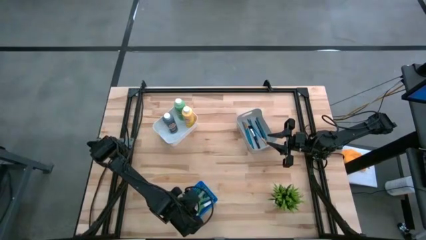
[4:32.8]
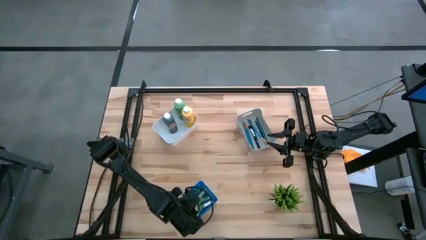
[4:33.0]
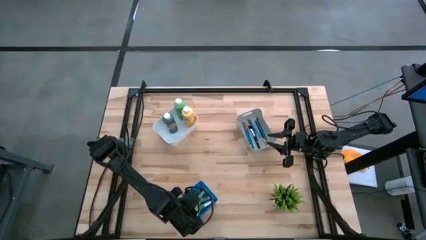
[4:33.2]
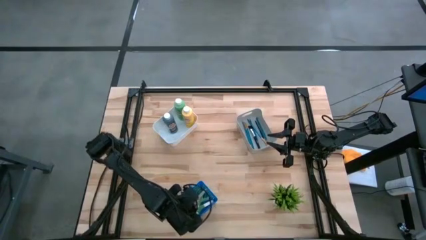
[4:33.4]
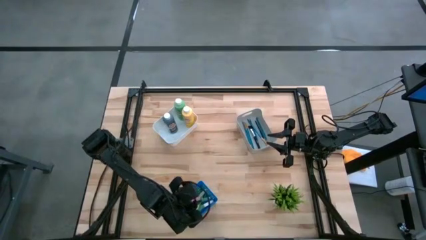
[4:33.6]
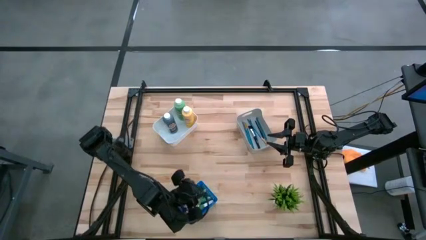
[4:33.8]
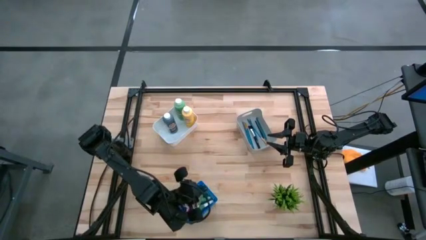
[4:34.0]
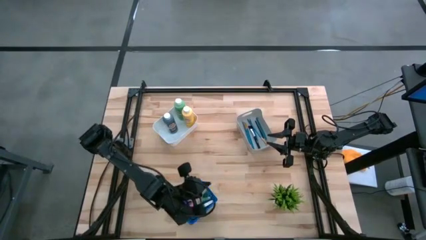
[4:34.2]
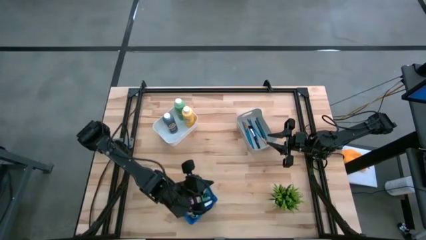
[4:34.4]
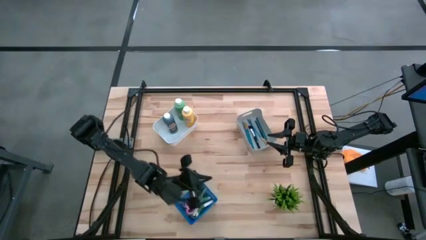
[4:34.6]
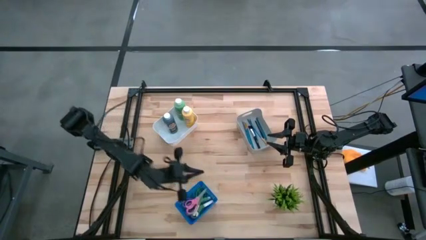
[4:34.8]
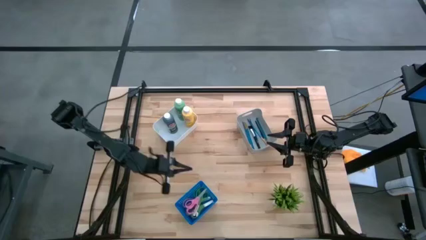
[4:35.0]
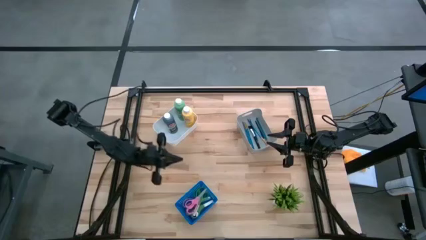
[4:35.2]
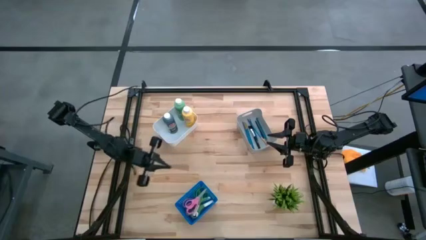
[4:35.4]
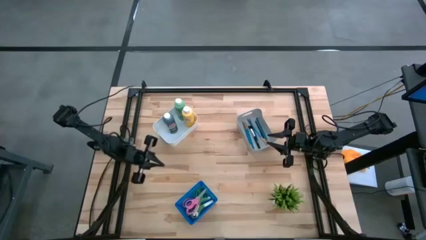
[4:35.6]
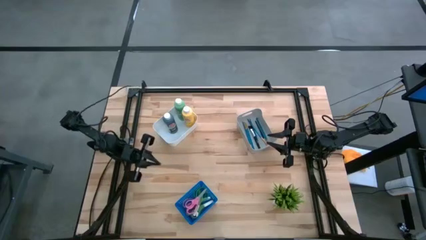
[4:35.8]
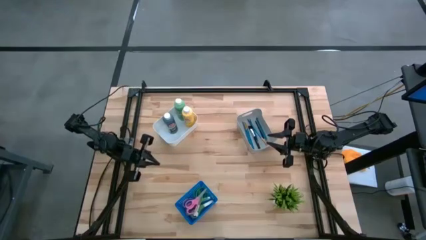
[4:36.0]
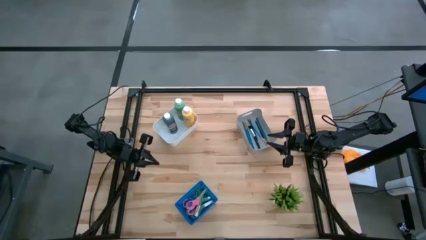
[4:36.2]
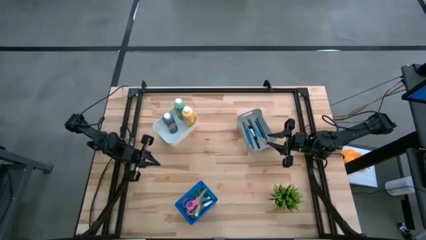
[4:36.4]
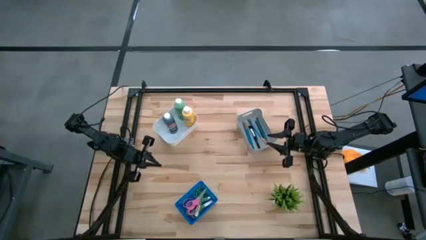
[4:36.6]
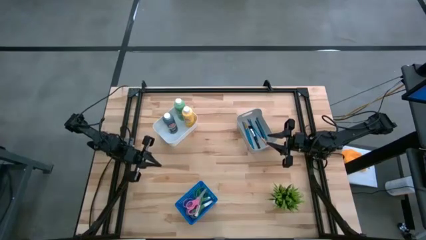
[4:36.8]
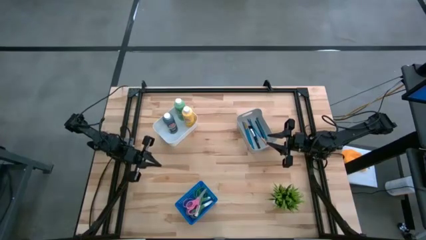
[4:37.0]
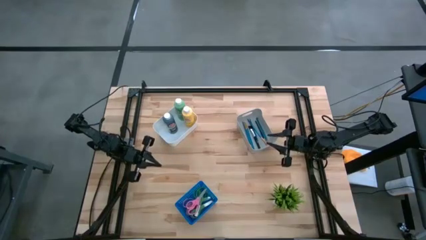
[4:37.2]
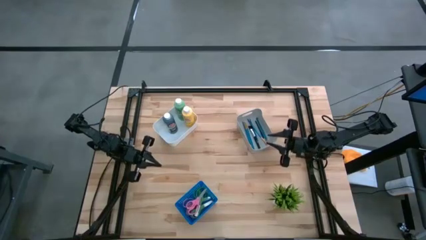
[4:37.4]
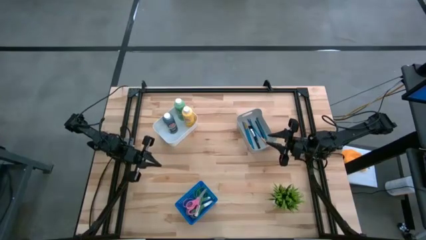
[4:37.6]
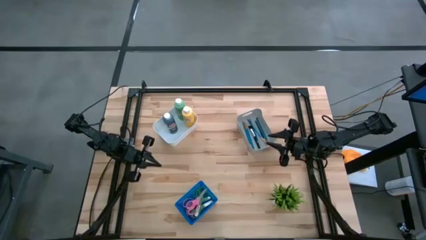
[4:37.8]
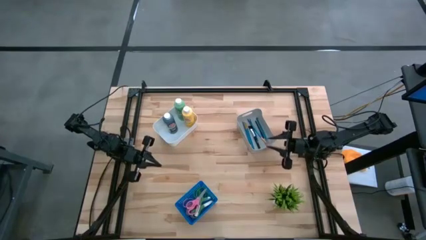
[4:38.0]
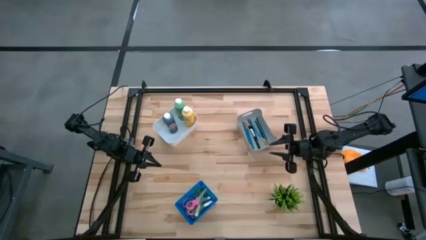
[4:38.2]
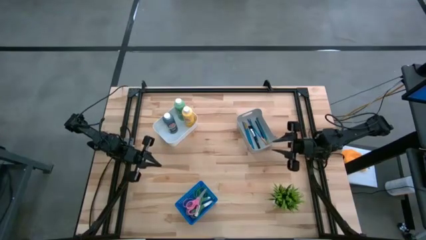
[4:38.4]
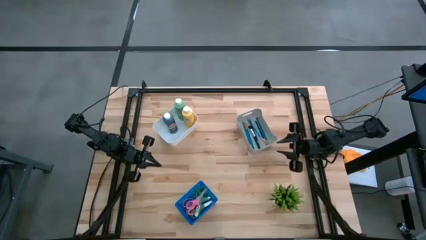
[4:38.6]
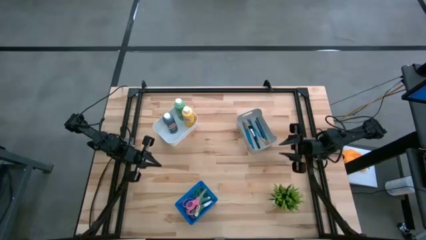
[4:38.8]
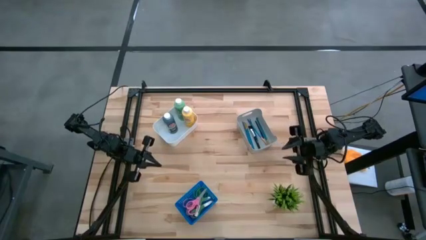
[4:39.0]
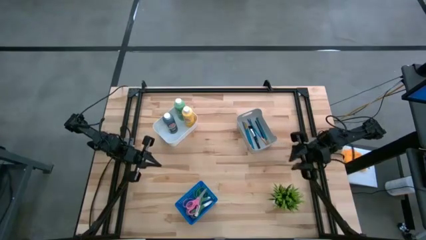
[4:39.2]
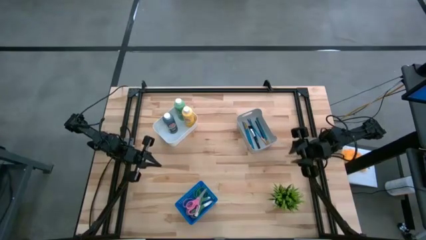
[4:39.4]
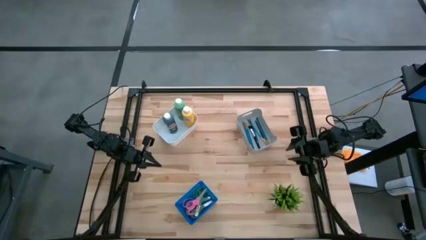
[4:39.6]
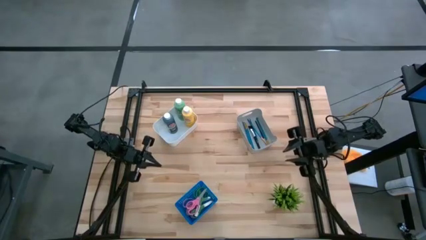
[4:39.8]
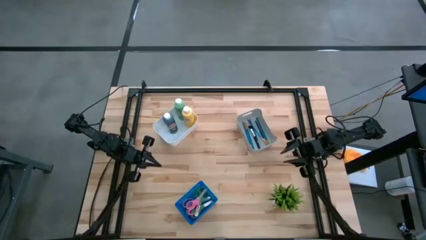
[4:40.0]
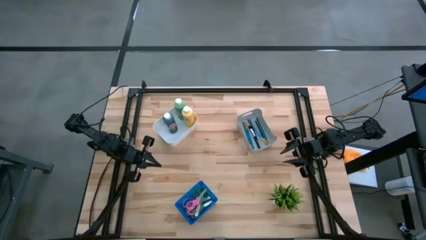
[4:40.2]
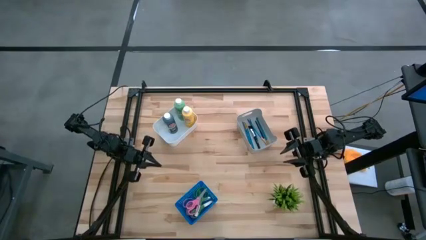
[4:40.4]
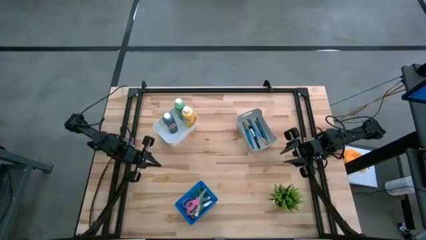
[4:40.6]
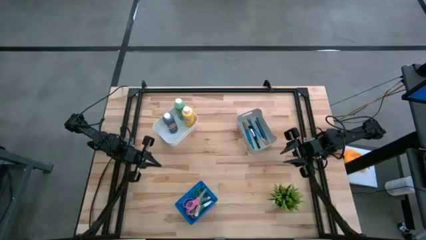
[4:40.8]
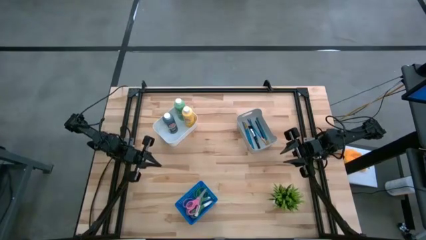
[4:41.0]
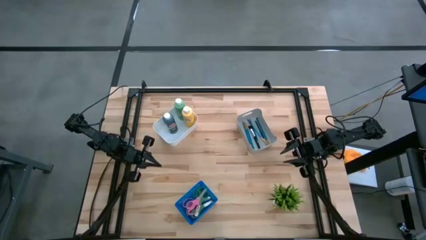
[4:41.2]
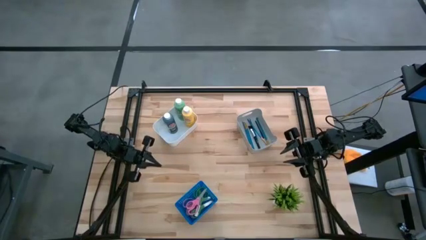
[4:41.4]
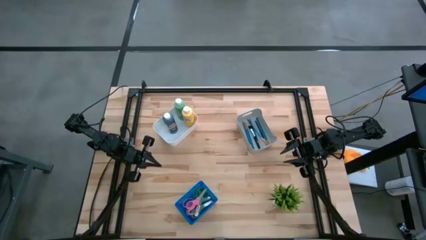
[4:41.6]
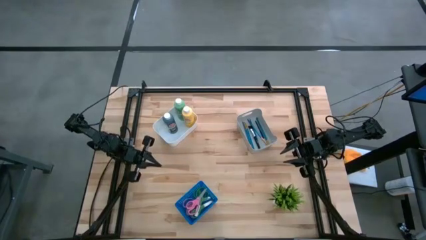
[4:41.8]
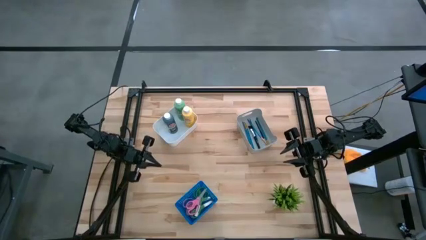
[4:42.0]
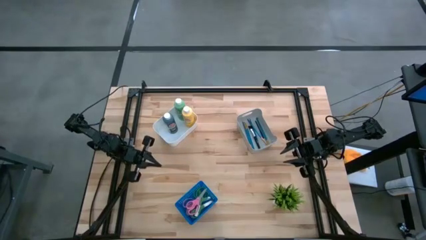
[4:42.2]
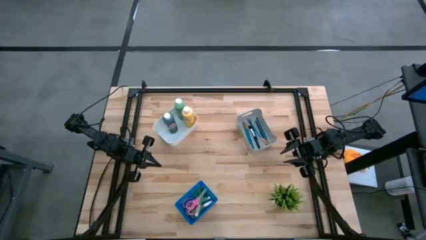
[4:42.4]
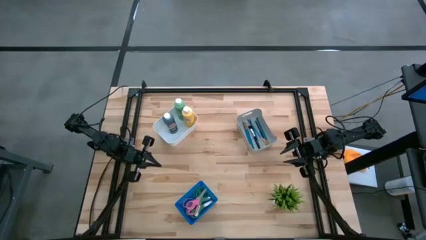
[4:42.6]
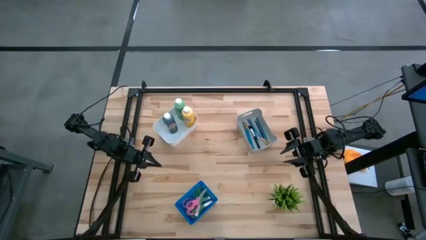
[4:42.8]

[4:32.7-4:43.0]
Task: Pick & Place Paint Supplies
Return to Home Position

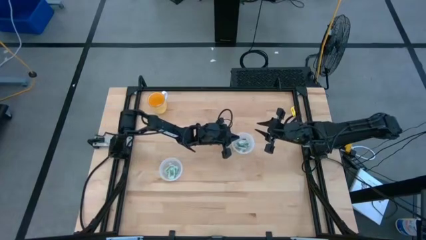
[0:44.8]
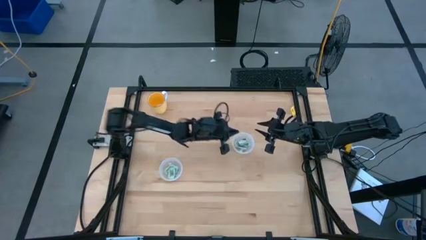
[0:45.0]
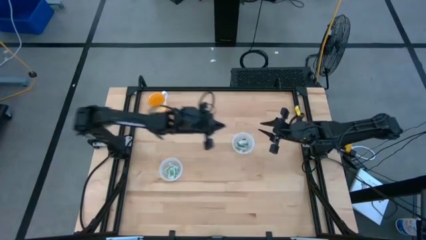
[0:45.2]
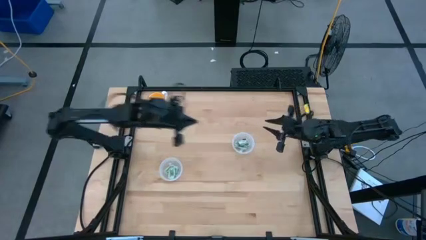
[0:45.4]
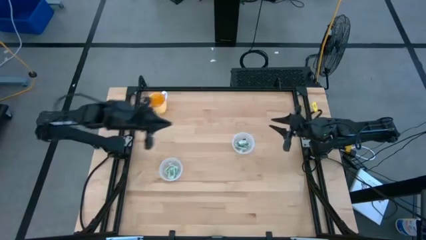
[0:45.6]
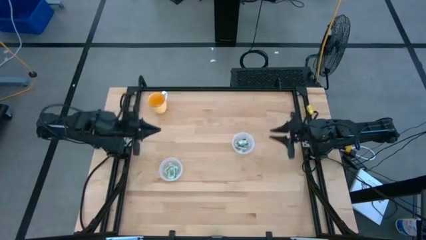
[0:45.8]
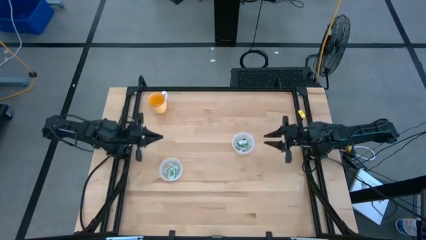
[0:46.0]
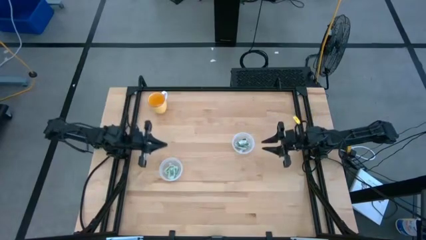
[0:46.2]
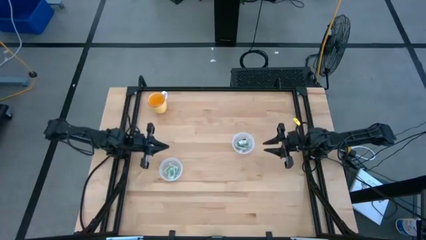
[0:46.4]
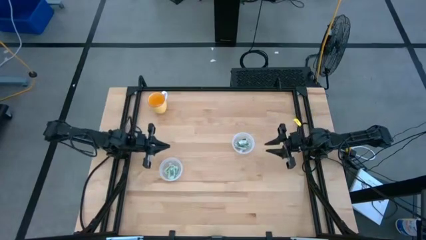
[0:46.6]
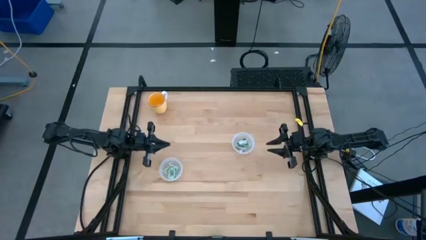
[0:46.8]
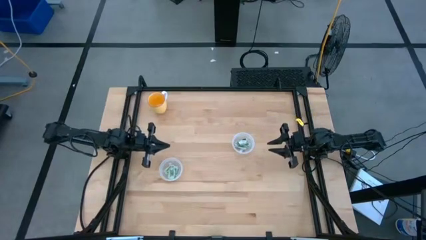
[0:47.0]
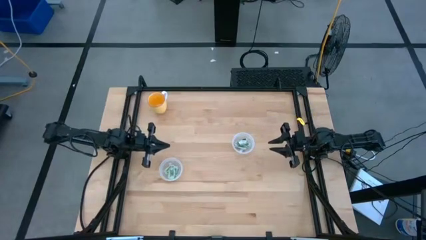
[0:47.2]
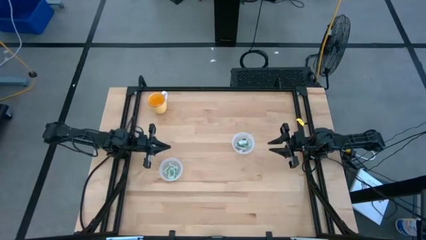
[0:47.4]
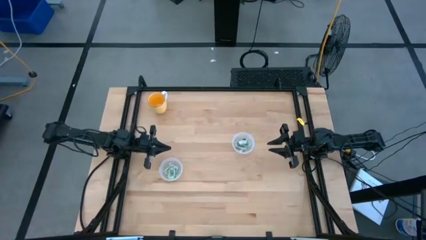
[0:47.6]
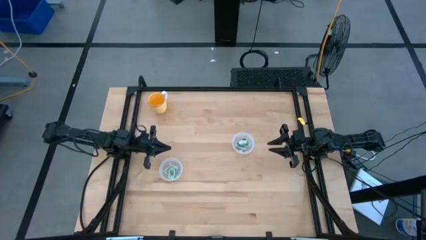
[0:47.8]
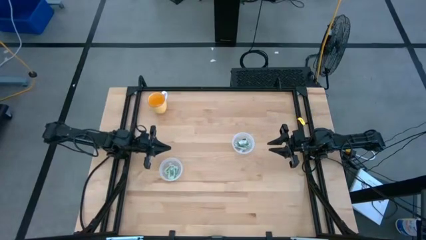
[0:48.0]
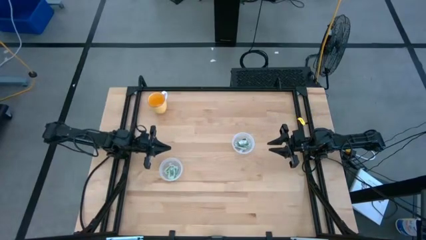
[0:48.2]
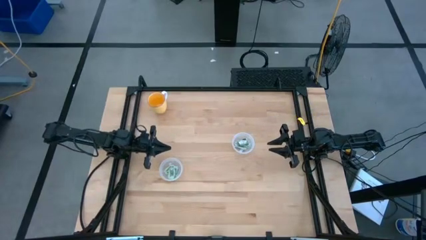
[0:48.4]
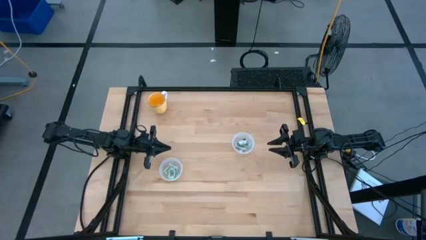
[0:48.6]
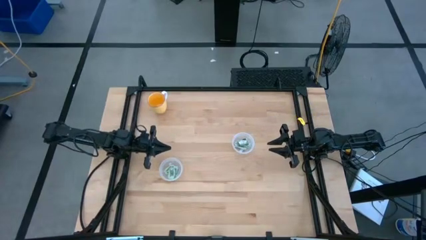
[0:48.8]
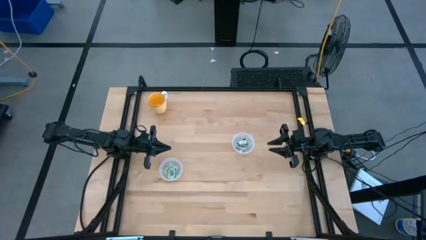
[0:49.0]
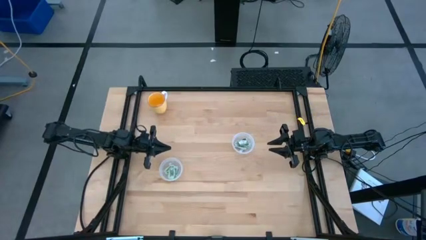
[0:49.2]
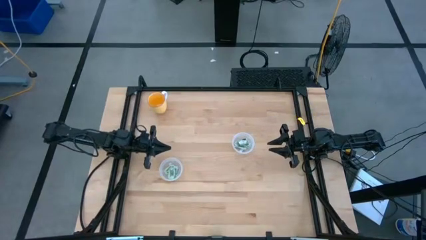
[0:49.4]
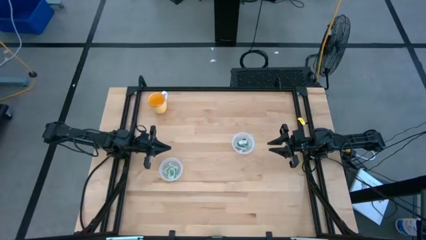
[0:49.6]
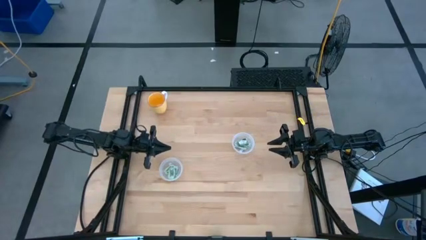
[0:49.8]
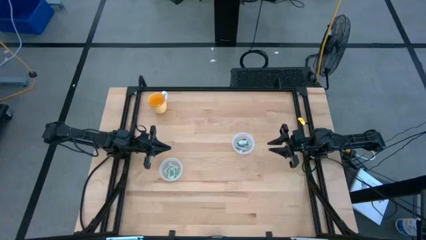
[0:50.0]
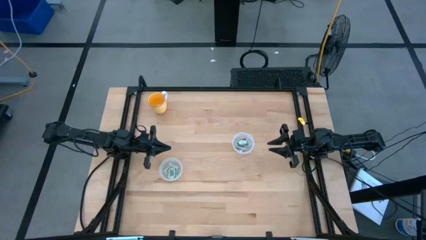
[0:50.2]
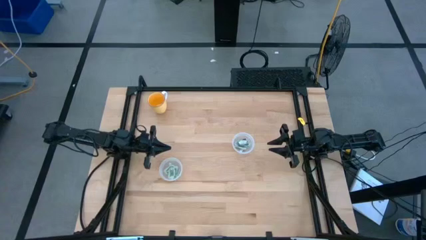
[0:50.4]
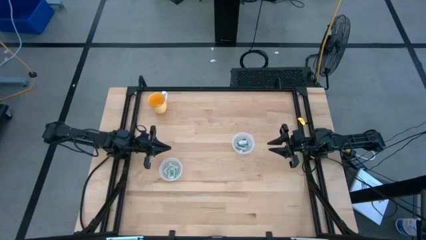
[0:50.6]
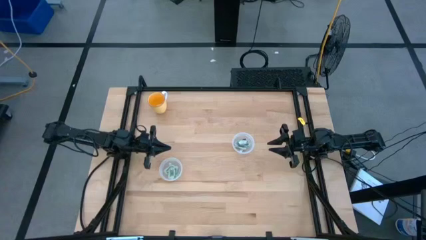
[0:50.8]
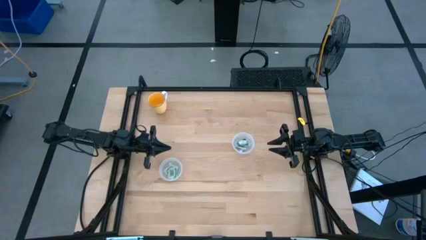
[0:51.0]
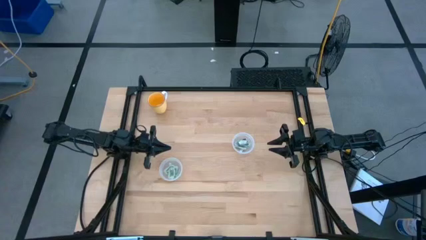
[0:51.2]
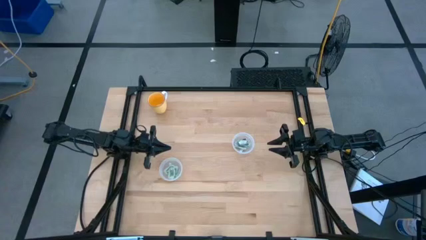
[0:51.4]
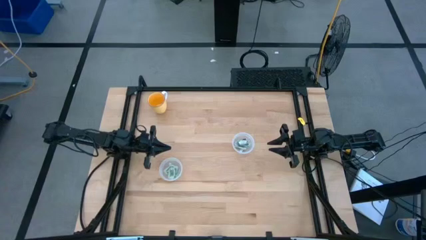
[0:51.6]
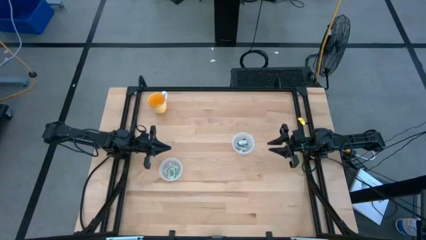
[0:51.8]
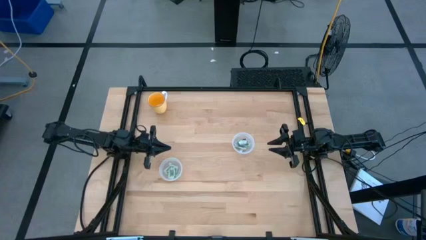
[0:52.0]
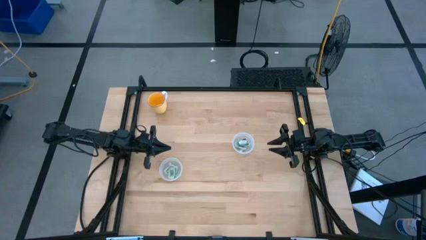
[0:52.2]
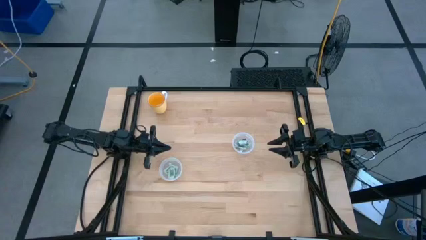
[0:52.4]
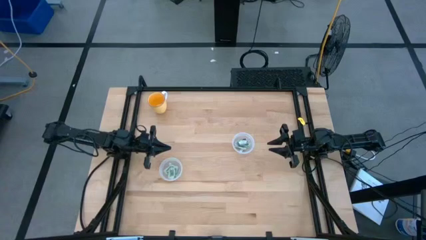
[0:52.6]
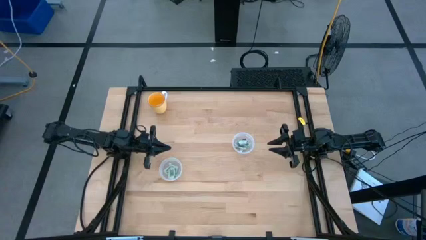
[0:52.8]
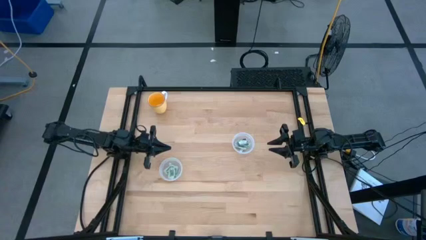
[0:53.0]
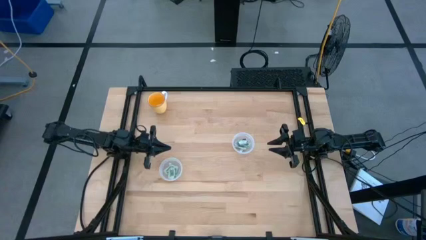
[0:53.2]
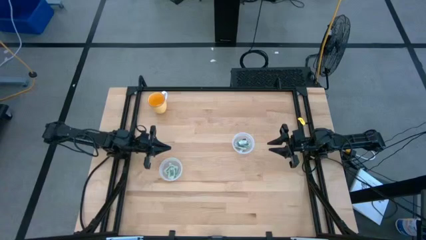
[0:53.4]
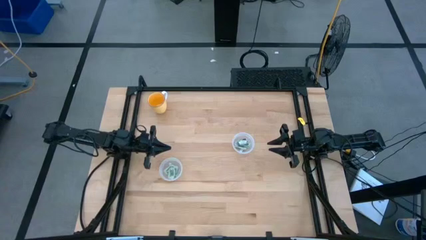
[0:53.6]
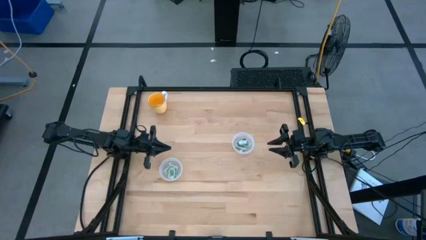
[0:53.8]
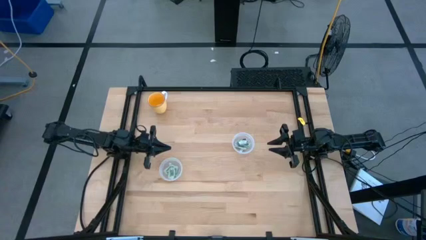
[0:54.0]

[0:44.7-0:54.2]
Task: Pick and place Stevia / Truvia into bins
Return to Home Position
